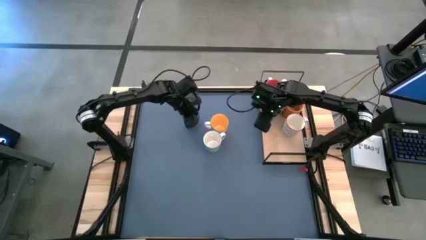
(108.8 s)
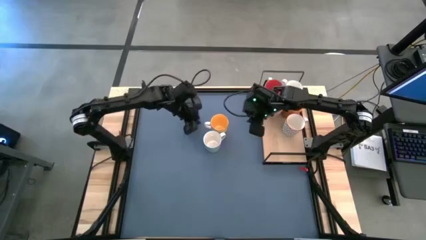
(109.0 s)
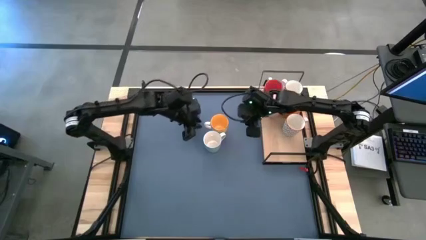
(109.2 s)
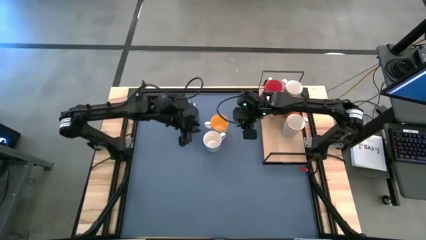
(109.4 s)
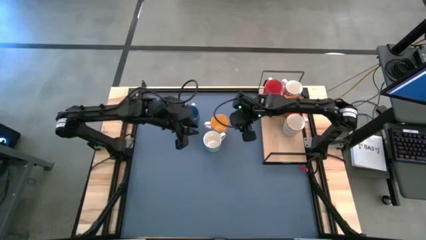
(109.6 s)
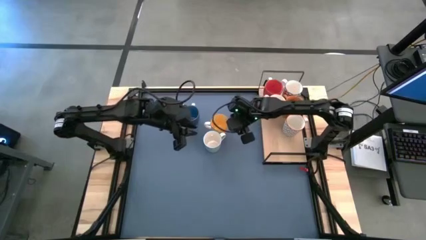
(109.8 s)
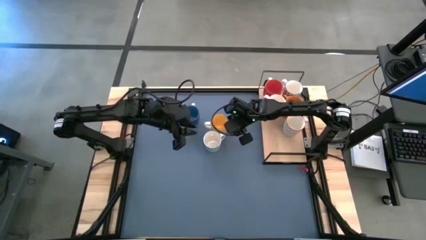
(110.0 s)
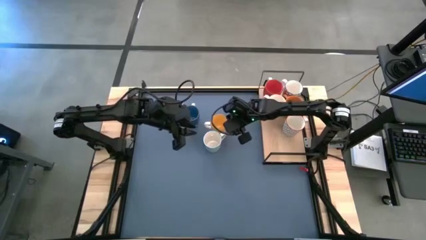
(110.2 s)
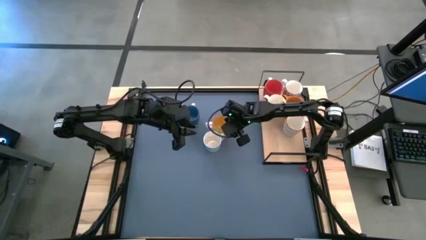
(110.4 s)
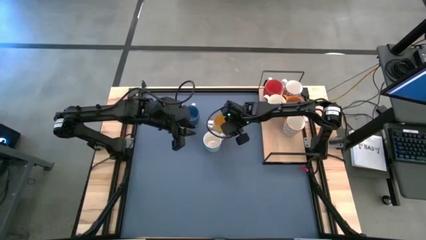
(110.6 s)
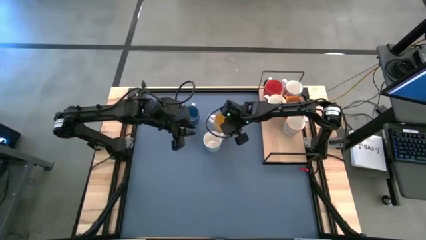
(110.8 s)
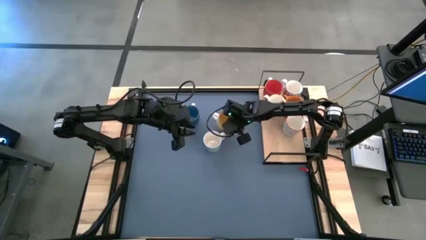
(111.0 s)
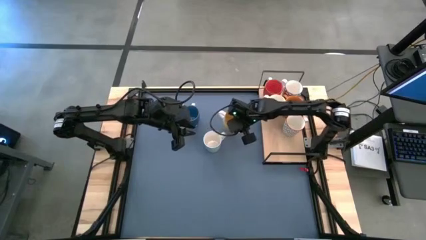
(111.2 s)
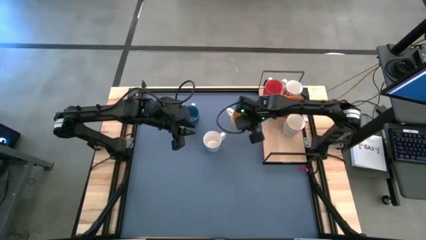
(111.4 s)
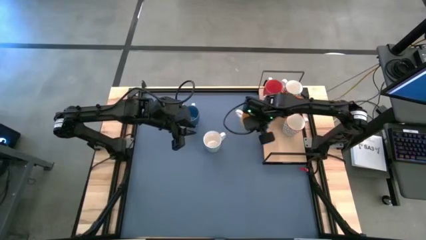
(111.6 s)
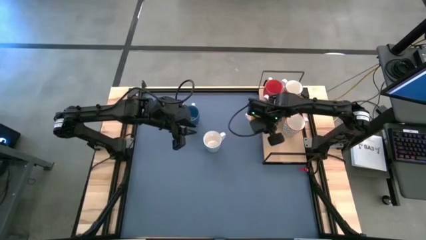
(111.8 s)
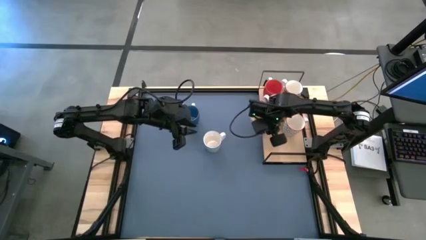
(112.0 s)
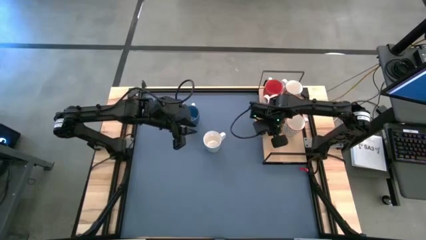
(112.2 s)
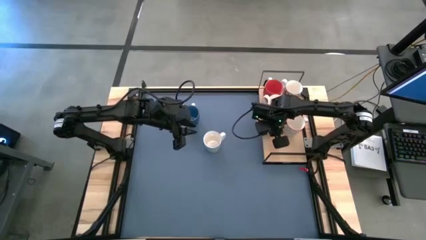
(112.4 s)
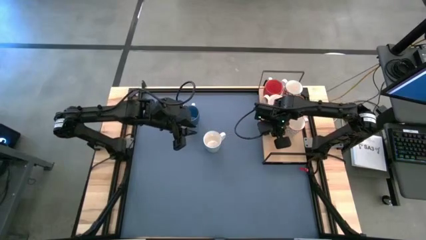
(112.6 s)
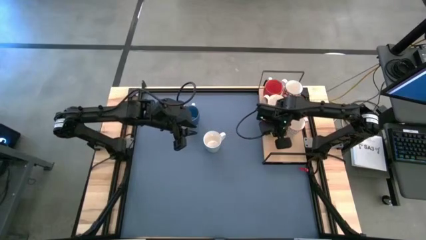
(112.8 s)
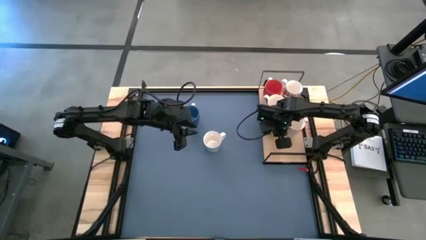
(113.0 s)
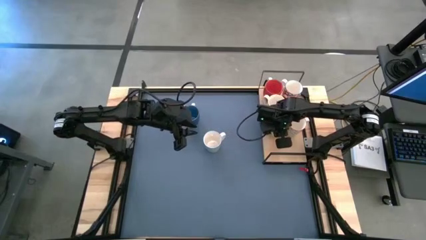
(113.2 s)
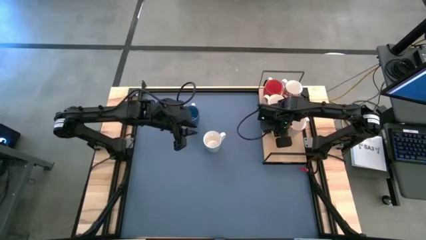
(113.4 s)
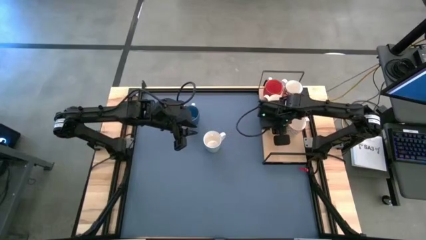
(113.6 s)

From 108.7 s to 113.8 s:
Task: Place coffee mugs
Put the yellow mug on the shelf

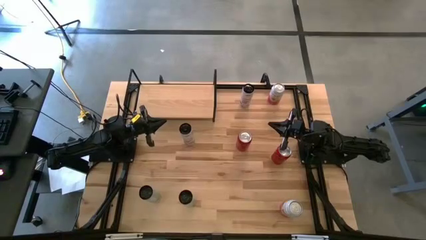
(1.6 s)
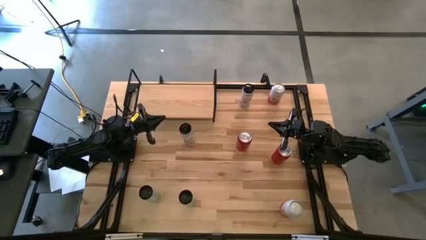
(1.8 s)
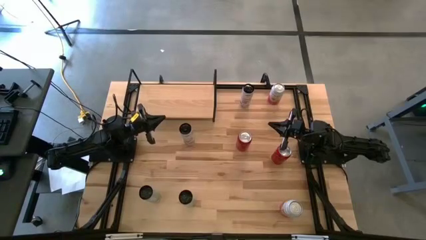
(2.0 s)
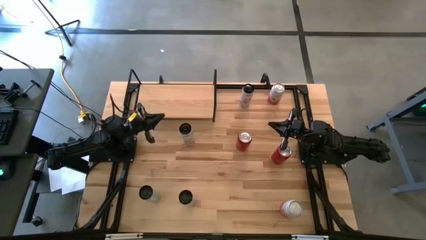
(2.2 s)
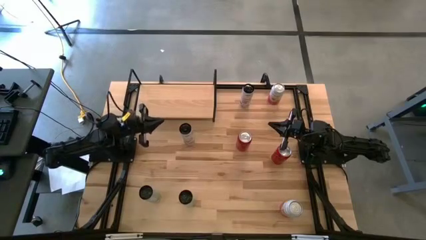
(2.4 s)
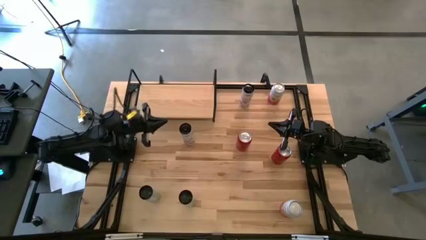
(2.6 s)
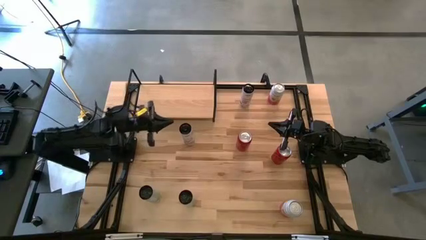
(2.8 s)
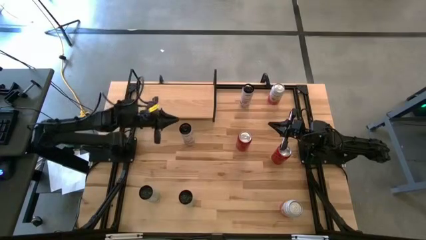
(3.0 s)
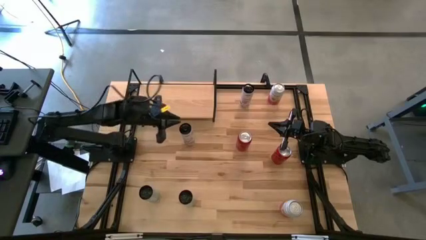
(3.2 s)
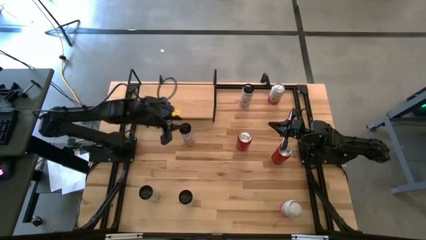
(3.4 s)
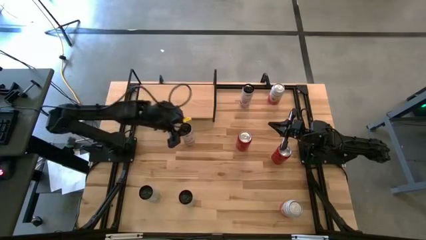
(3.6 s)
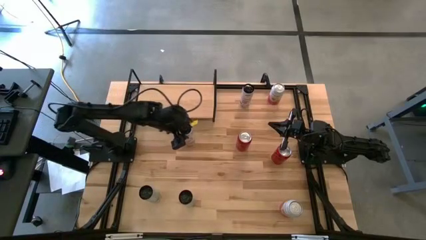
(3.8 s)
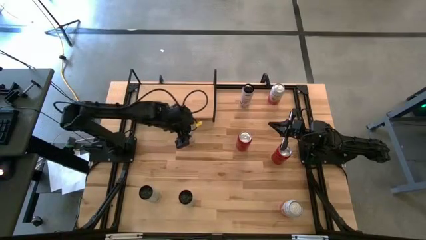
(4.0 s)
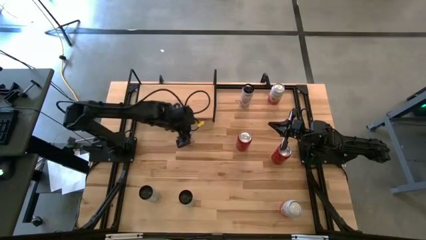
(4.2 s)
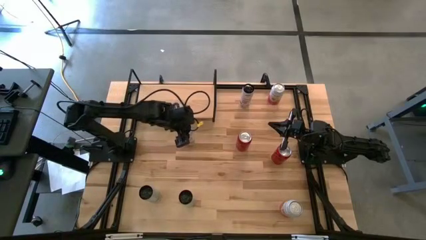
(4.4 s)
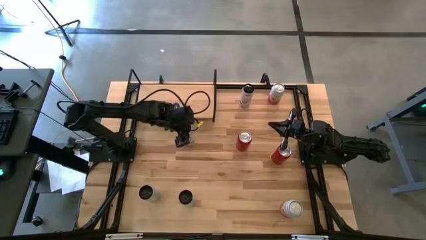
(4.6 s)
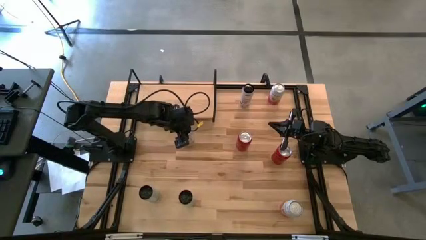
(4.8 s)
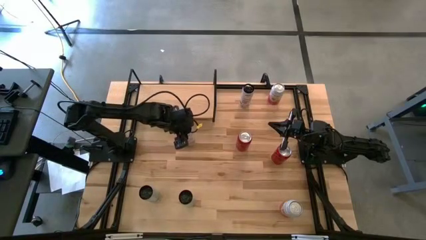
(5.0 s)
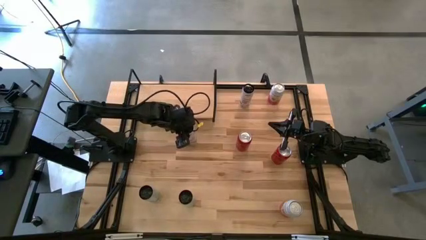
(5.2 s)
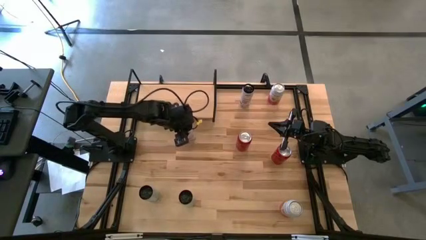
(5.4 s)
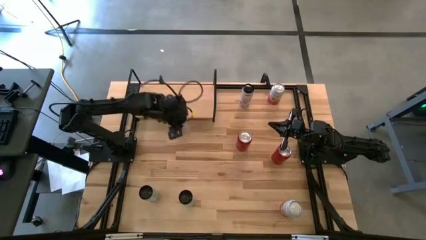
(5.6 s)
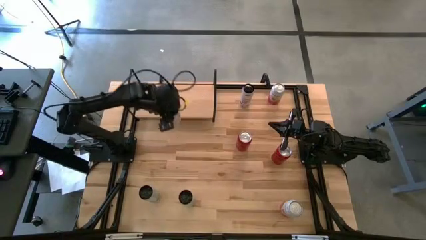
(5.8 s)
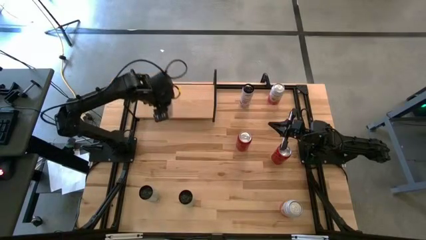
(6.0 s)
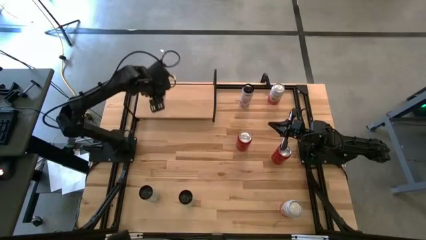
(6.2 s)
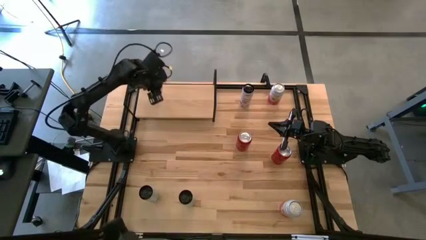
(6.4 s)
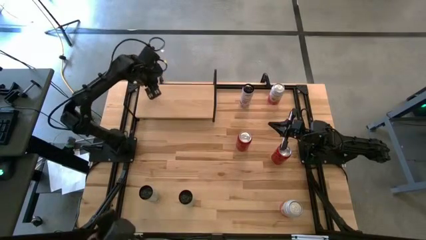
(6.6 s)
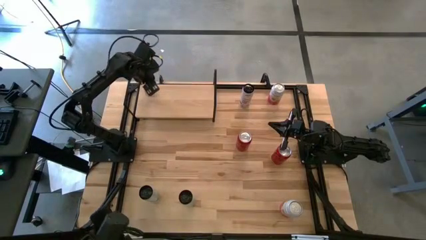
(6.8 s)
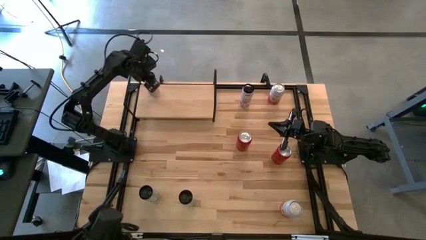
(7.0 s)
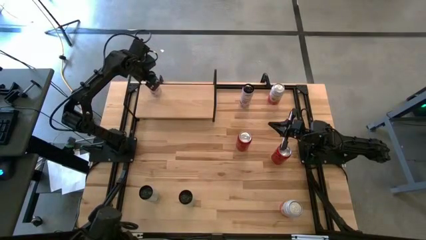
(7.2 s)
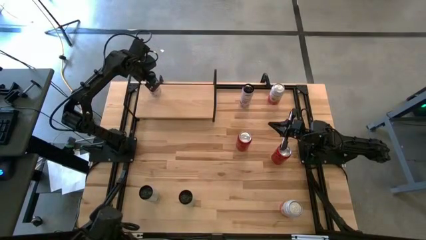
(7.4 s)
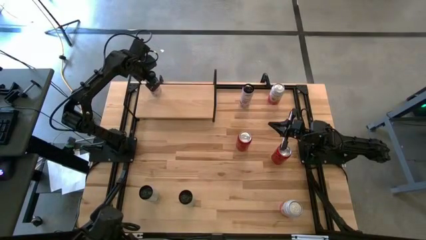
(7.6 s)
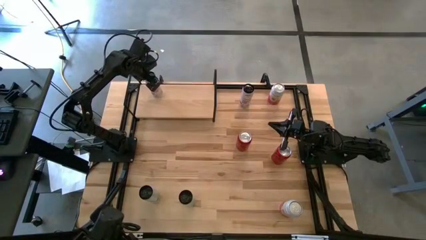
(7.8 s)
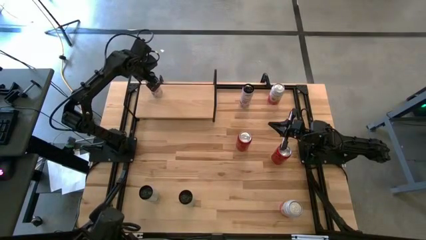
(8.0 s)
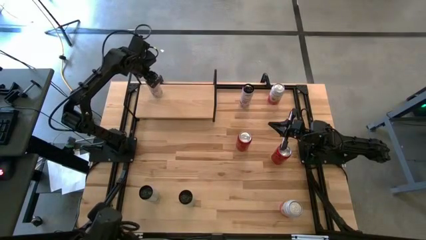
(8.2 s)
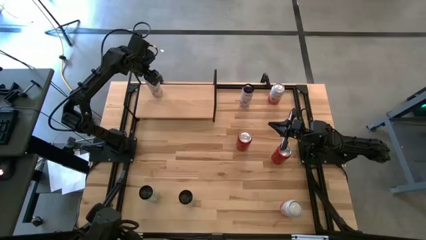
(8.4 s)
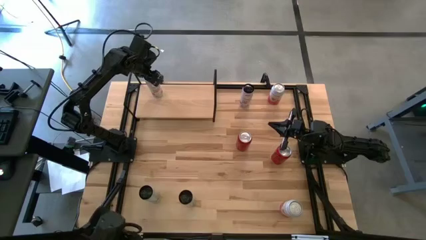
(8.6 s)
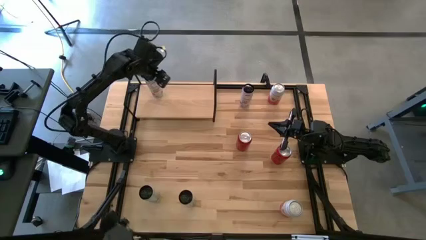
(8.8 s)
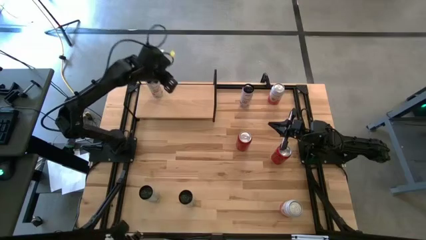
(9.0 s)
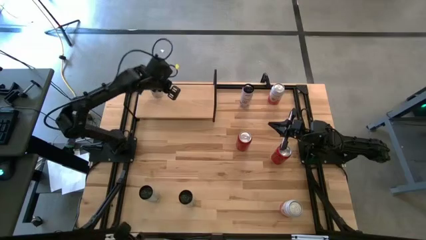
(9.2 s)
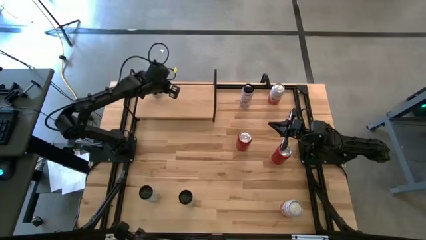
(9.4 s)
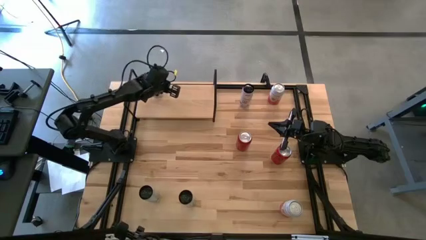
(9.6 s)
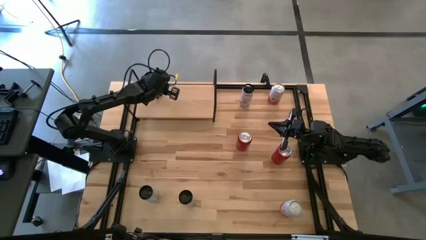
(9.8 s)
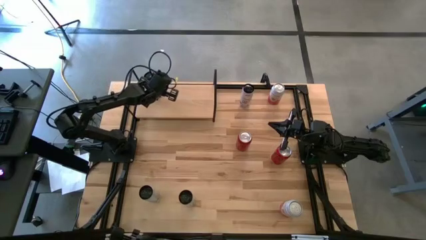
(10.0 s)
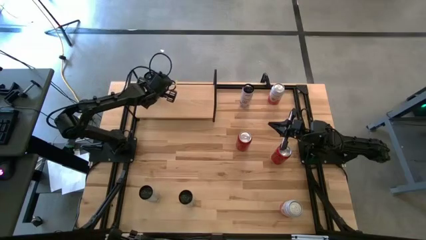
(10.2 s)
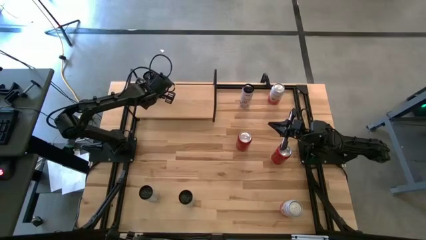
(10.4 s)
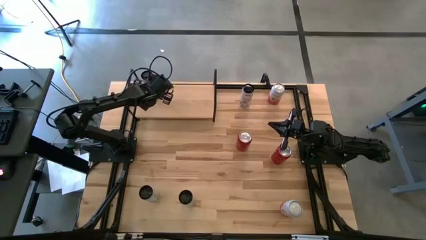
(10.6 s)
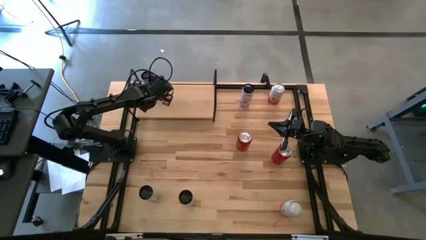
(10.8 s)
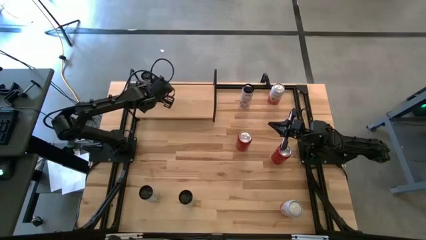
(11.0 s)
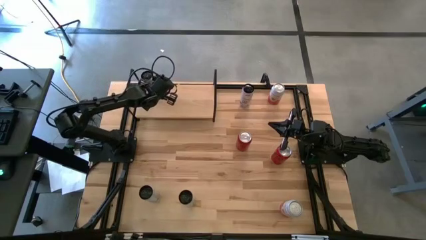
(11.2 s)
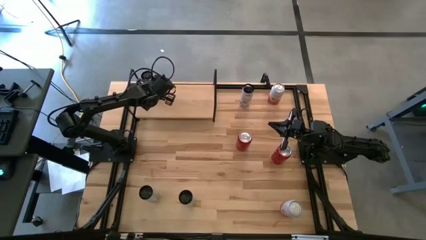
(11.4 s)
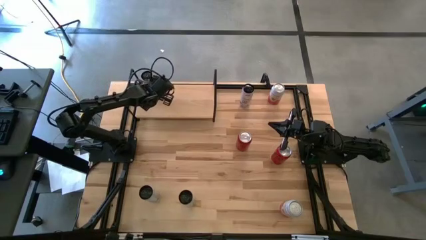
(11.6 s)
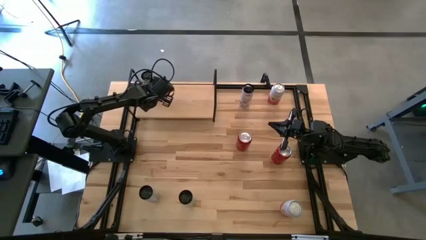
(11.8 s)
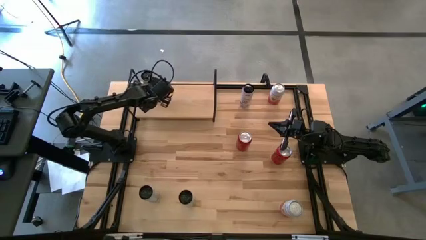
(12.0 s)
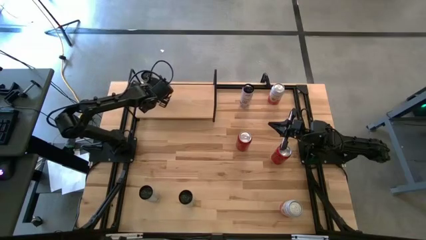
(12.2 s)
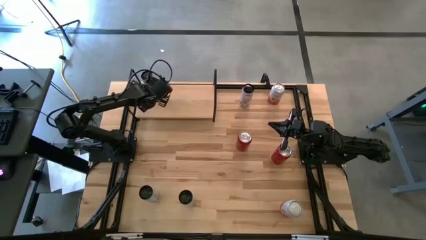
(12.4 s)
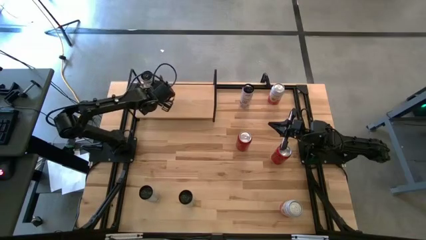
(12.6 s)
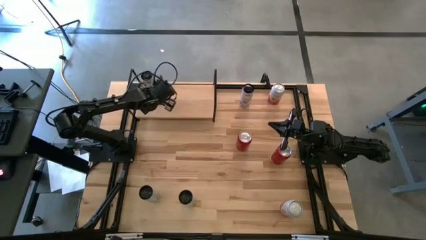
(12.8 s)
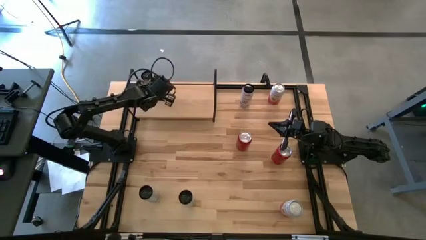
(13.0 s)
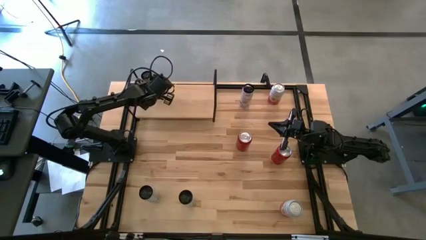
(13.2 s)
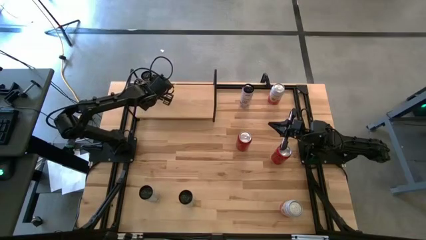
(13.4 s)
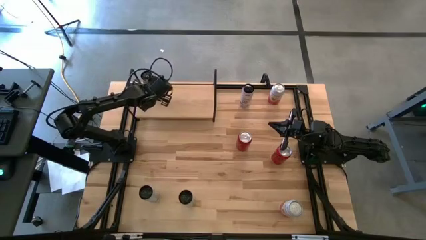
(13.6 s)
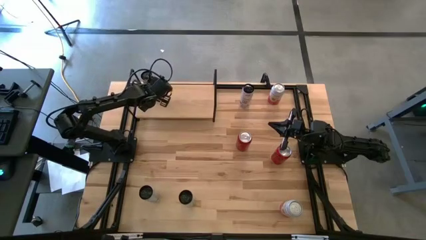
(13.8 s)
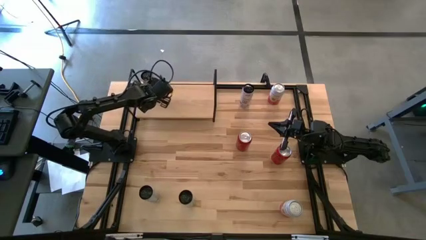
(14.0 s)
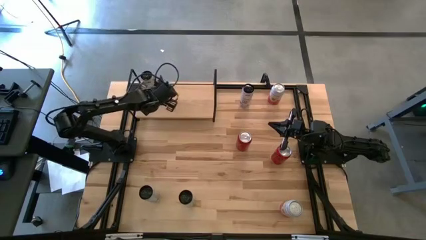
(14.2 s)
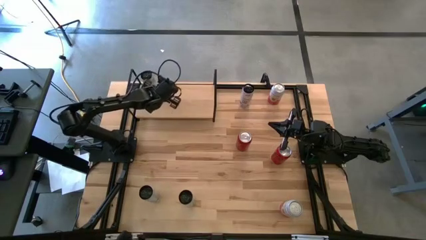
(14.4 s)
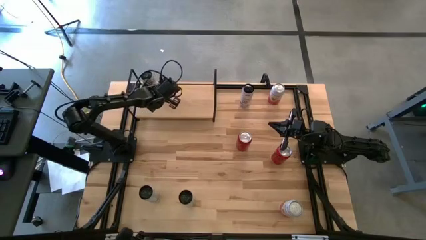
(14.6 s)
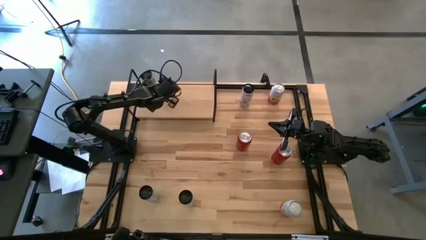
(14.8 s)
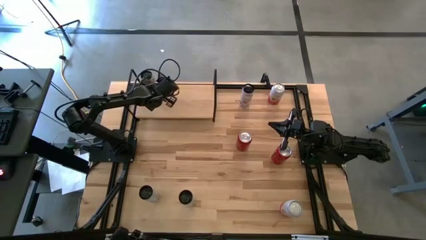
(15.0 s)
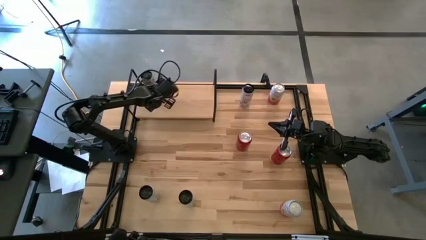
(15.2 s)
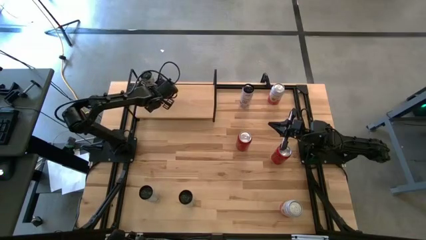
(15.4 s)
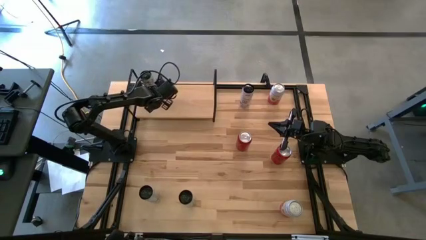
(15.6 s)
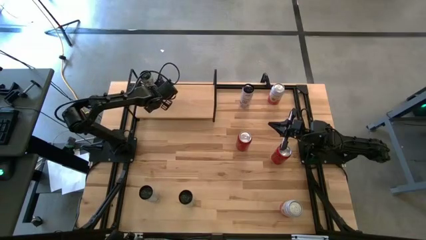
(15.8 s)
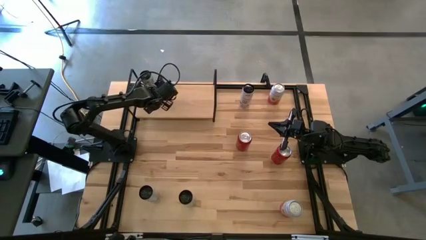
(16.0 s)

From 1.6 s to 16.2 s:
Task: Place canned beverage on shelf
Put the bottom white-pink soda can on the shelf
